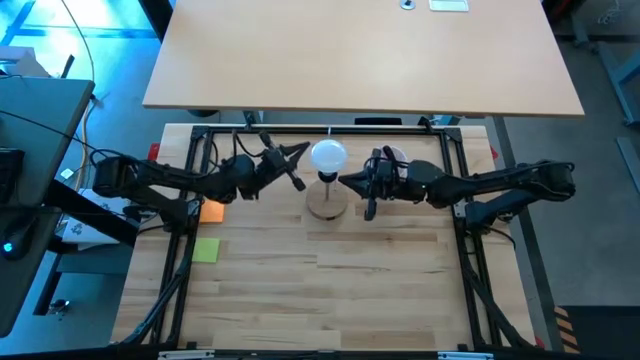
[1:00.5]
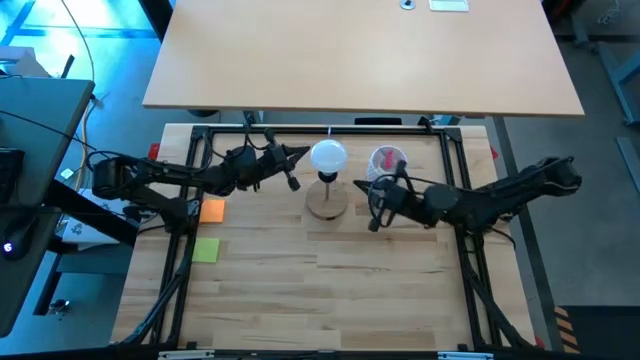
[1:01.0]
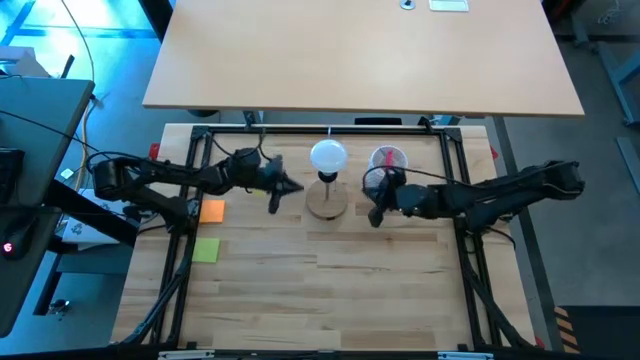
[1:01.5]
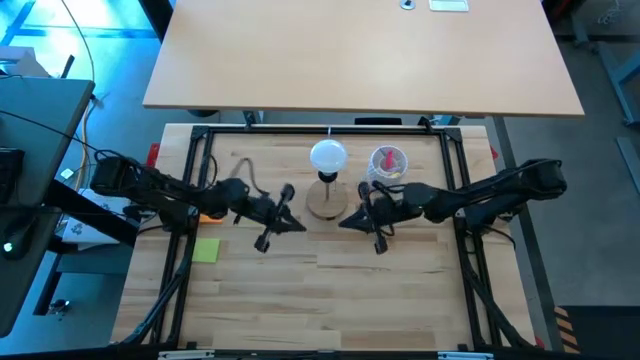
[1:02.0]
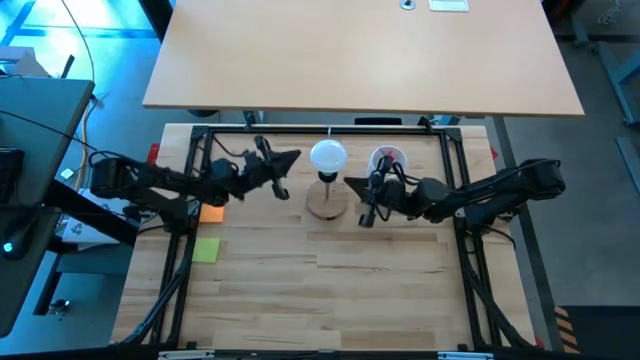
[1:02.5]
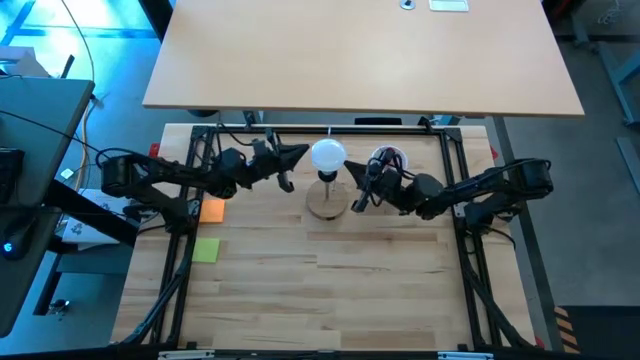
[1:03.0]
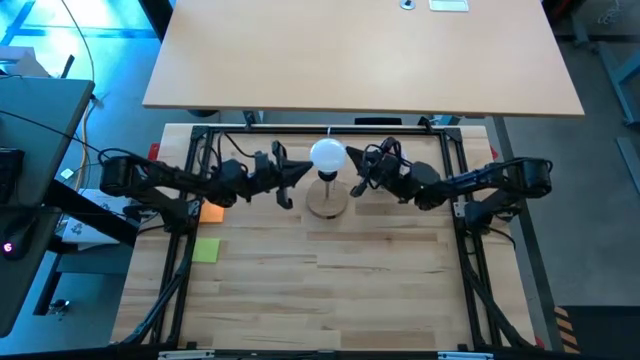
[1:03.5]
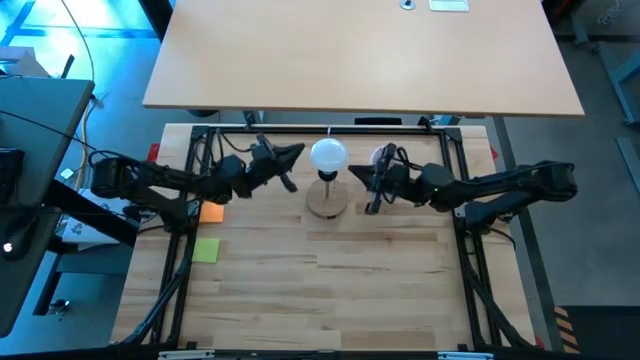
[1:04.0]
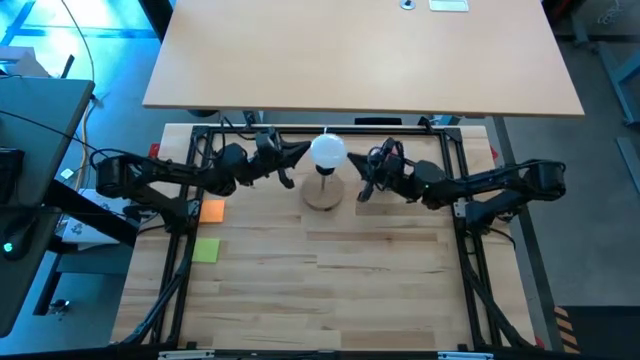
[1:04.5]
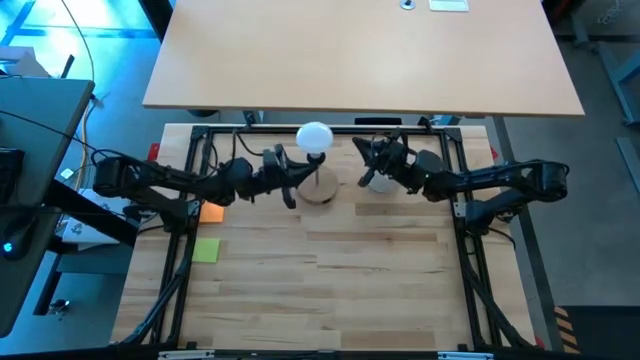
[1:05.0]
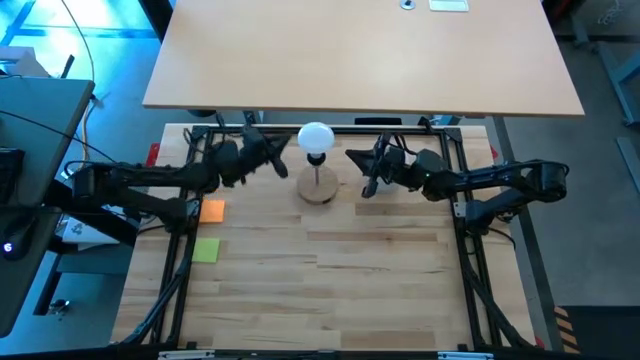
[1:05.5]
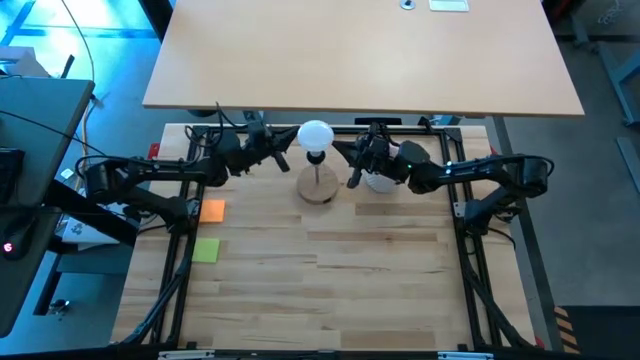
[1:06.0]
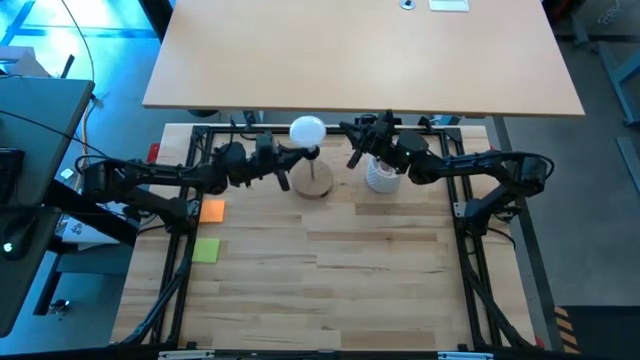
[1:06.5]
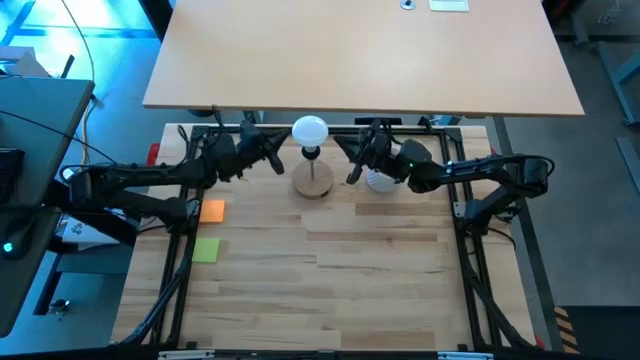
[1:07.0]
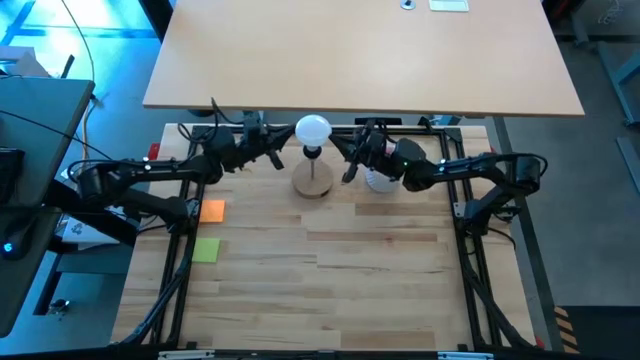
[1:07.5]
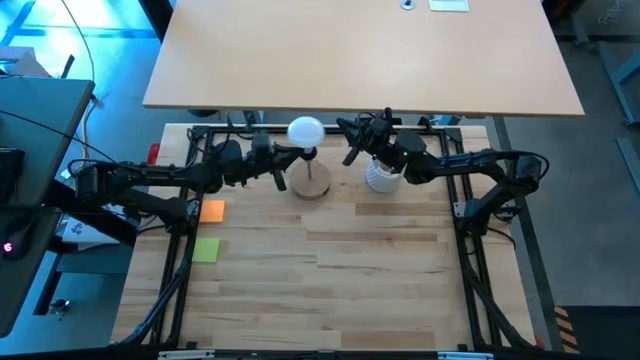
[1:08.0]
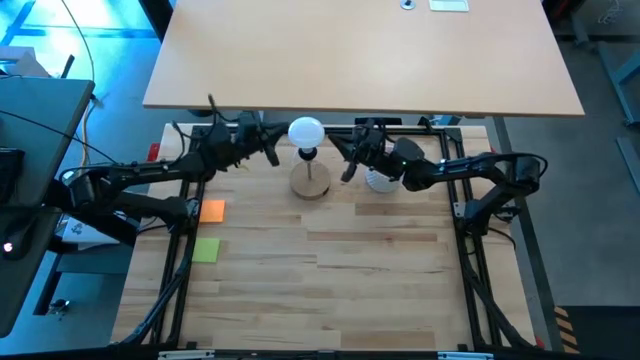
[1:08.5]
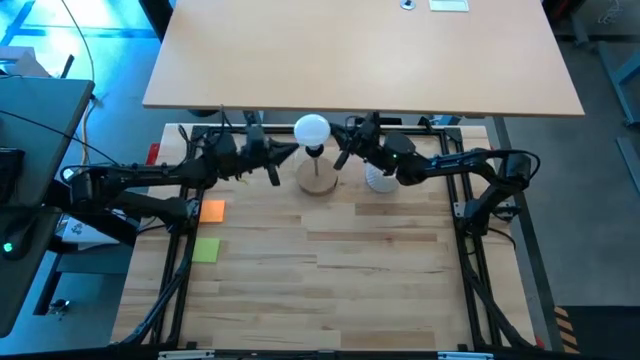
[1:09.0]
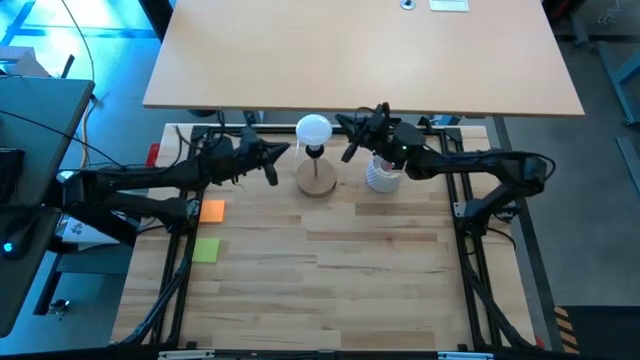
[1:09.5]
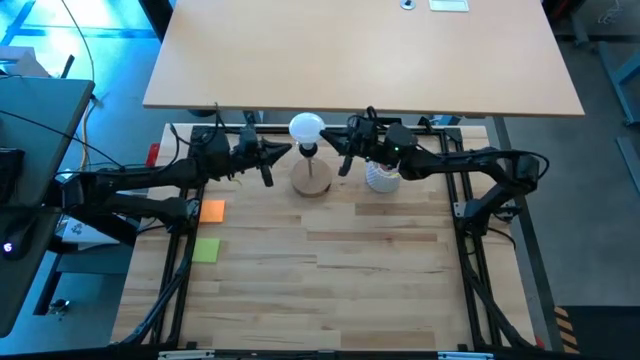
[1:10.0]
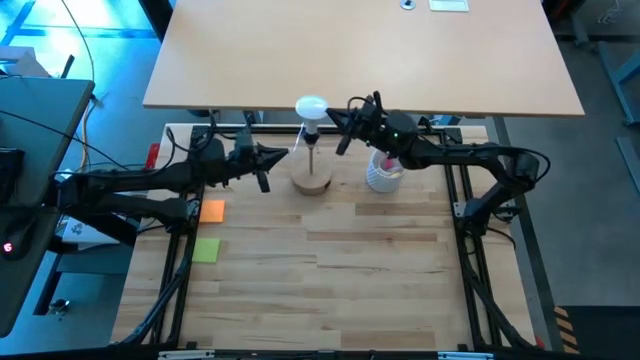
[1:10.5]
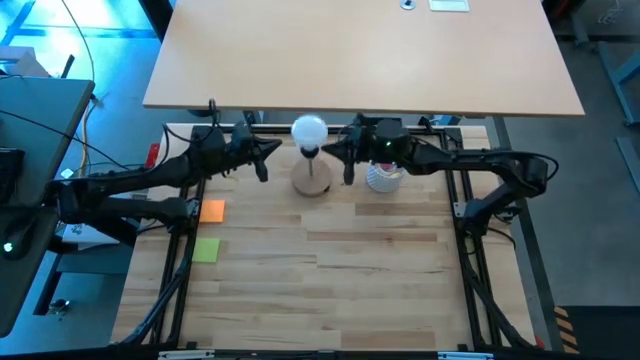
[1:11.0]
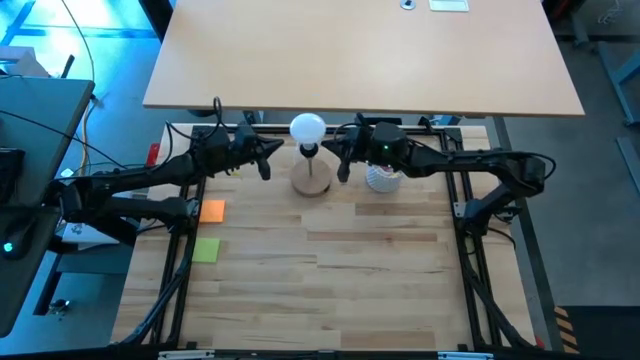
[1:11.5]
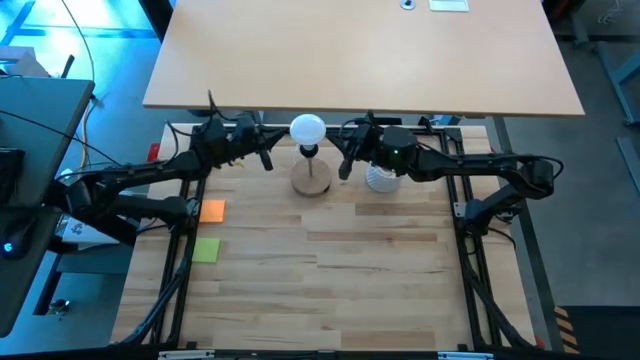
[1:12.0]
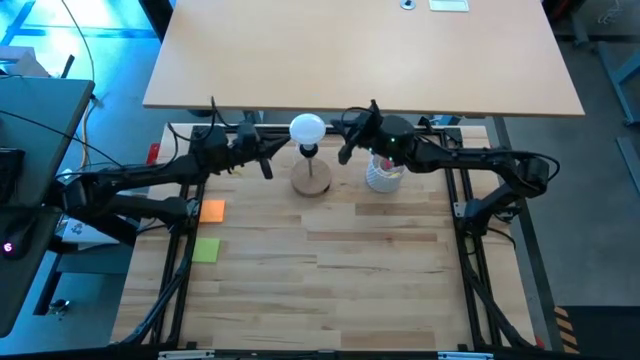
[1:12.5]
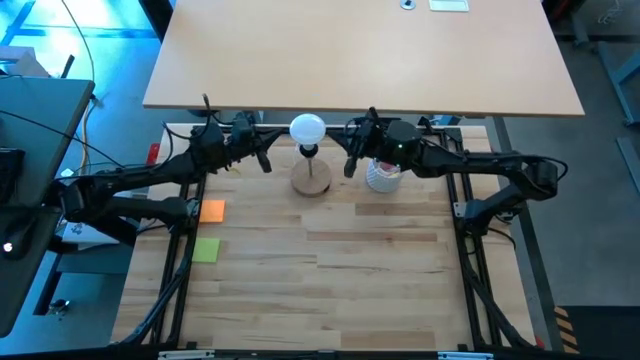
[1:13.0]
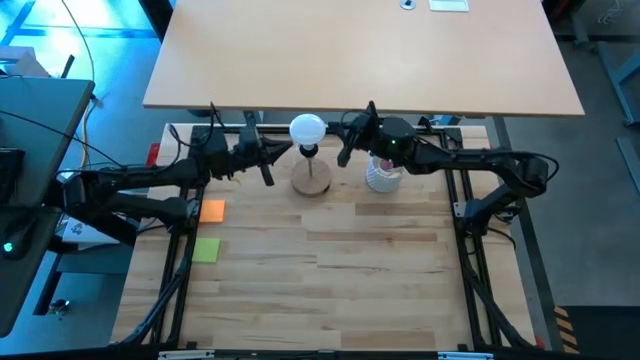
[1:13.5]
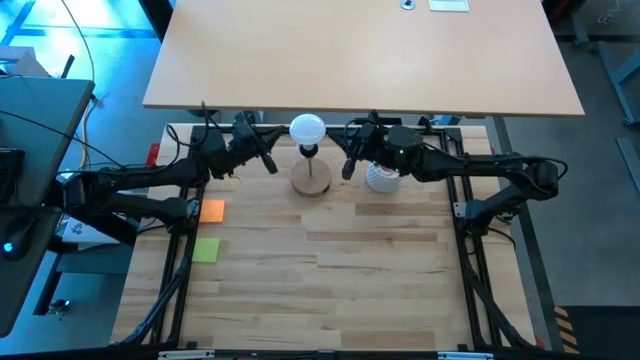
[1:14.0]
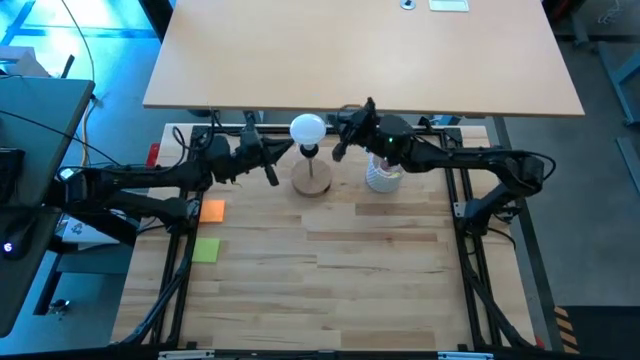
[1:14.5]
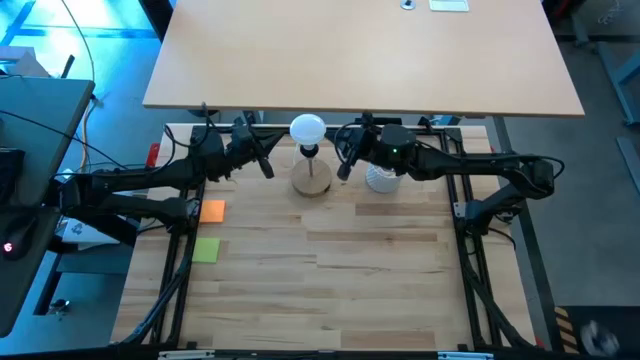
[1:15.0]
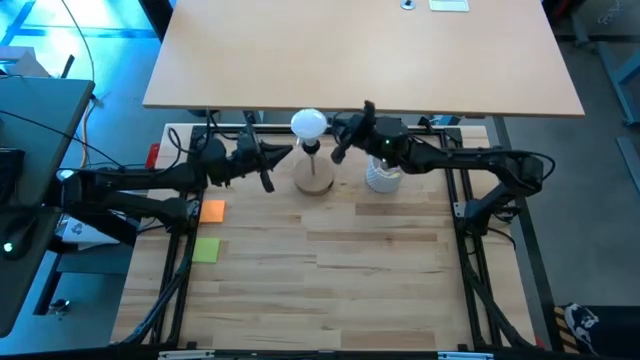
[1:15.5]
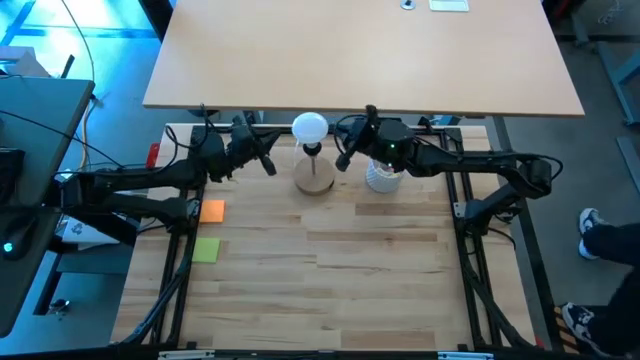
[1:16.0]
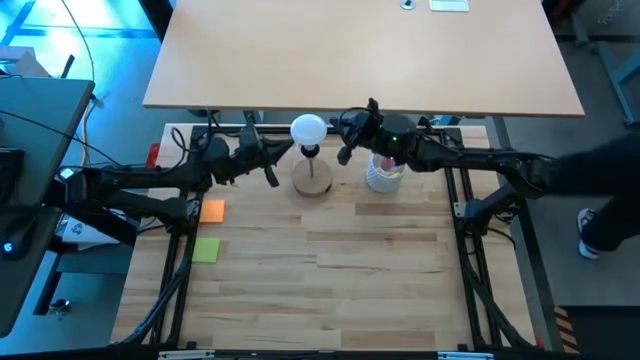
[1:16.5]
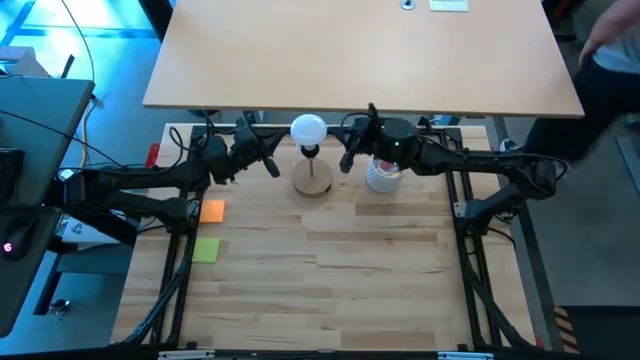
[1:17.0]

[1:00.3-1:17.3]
Task: Screw lightbulb
Remove the white lightbulb from the brown lamp
